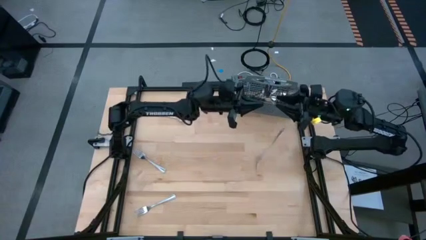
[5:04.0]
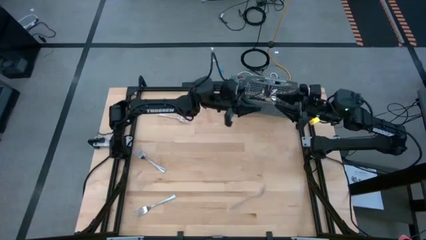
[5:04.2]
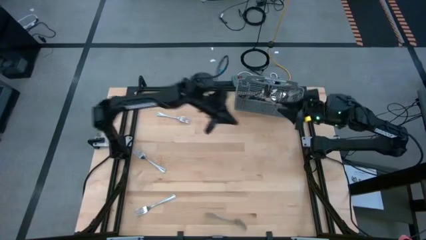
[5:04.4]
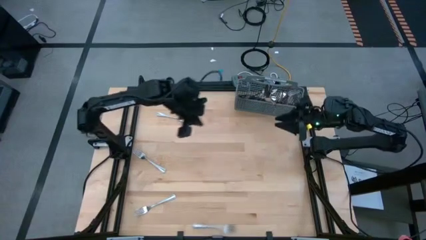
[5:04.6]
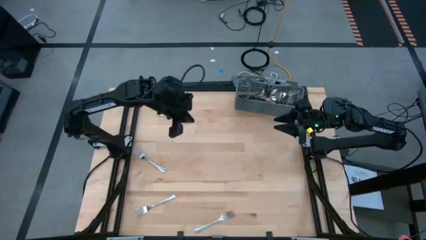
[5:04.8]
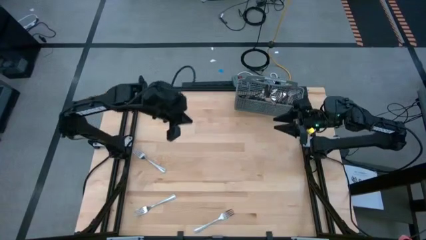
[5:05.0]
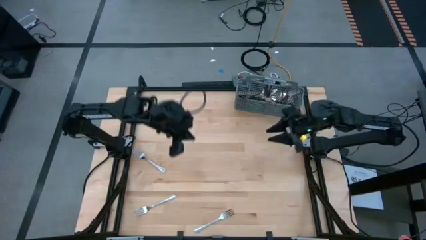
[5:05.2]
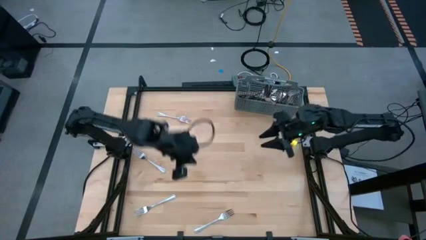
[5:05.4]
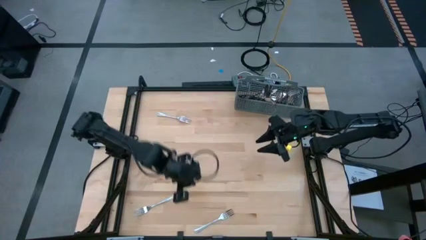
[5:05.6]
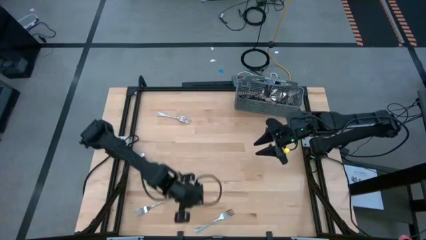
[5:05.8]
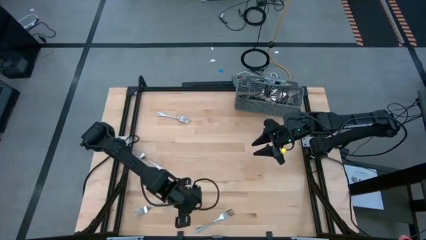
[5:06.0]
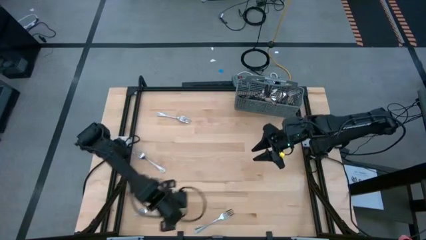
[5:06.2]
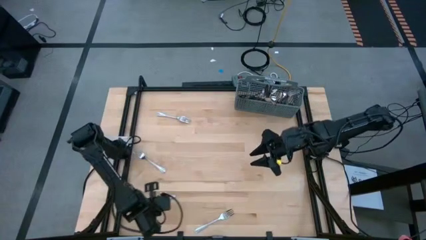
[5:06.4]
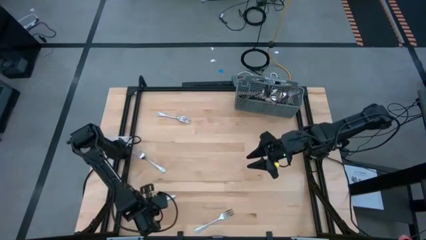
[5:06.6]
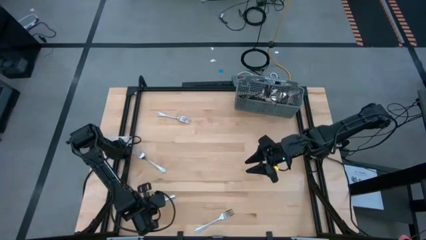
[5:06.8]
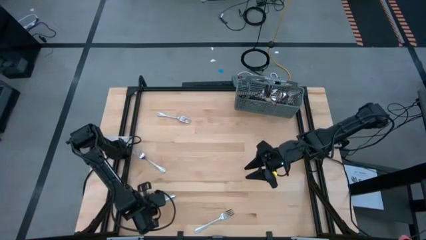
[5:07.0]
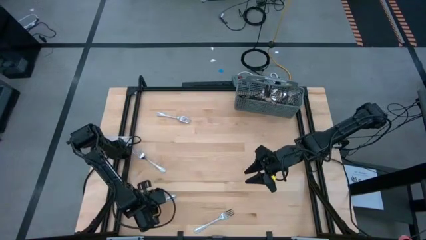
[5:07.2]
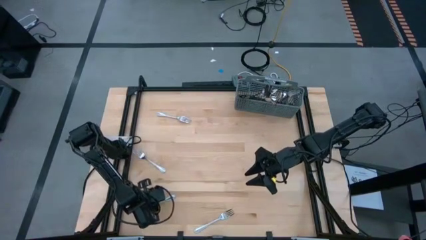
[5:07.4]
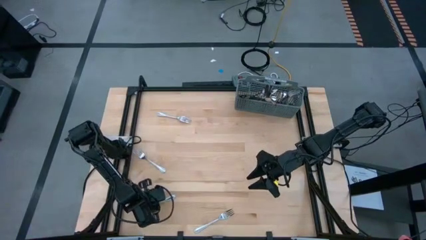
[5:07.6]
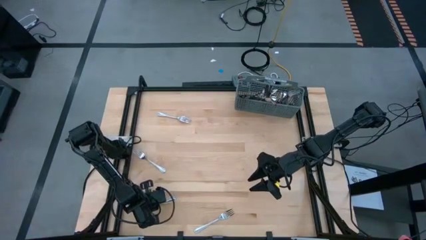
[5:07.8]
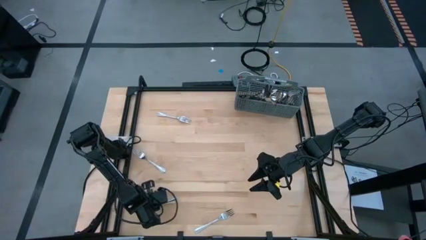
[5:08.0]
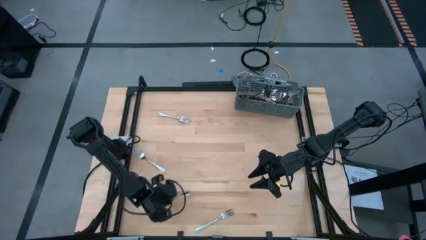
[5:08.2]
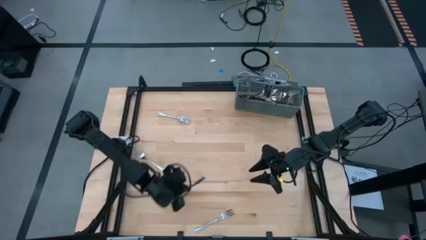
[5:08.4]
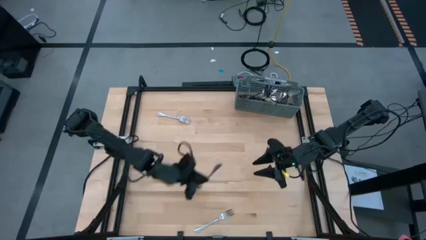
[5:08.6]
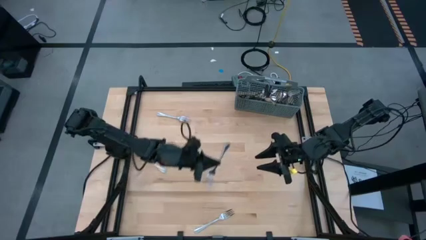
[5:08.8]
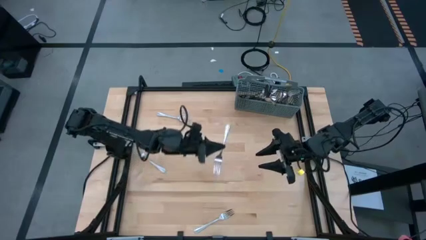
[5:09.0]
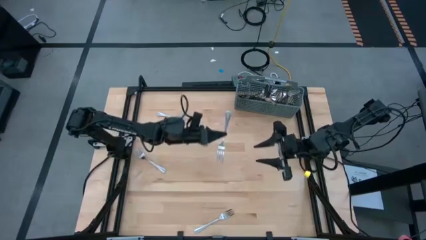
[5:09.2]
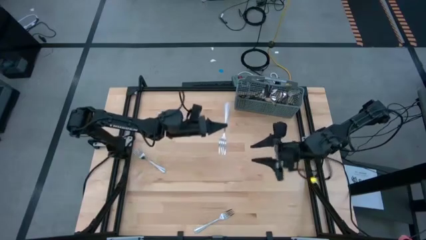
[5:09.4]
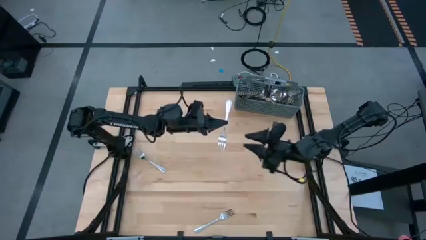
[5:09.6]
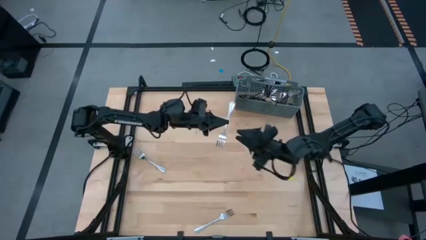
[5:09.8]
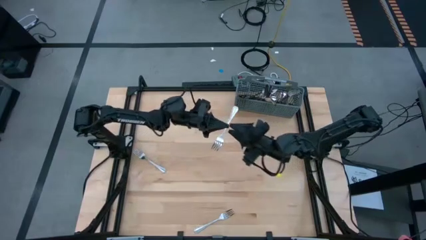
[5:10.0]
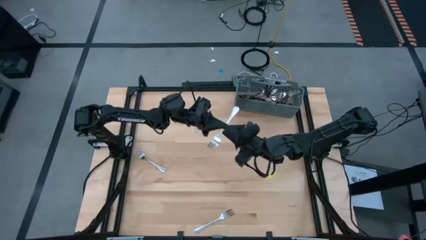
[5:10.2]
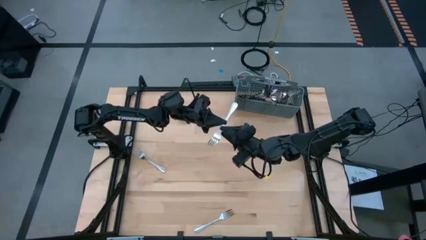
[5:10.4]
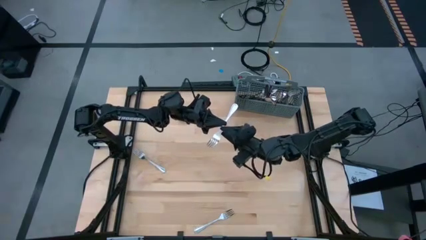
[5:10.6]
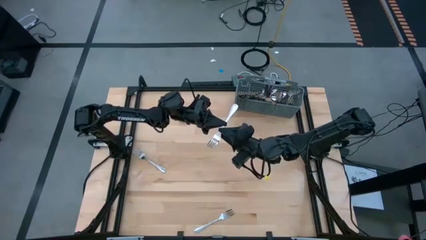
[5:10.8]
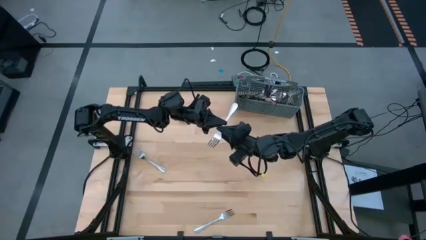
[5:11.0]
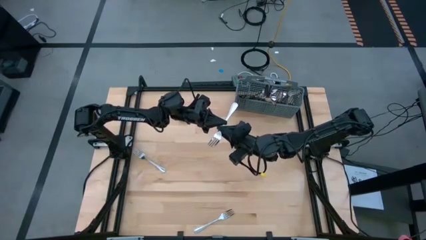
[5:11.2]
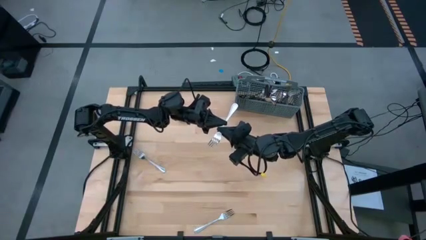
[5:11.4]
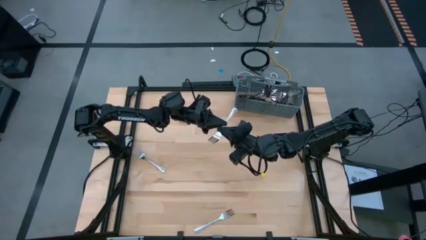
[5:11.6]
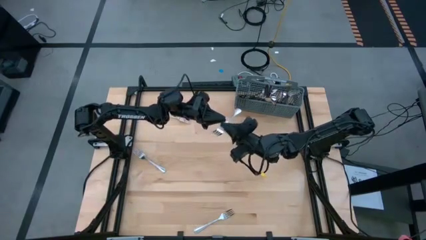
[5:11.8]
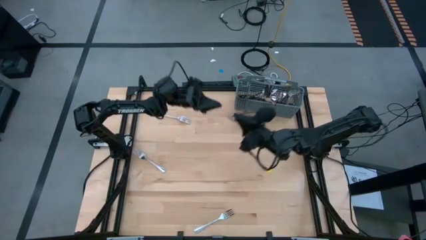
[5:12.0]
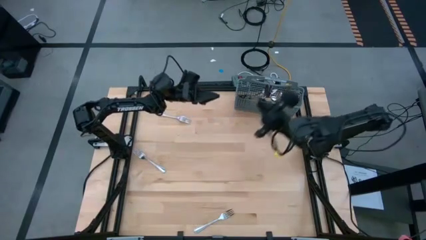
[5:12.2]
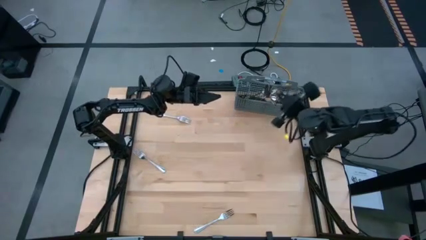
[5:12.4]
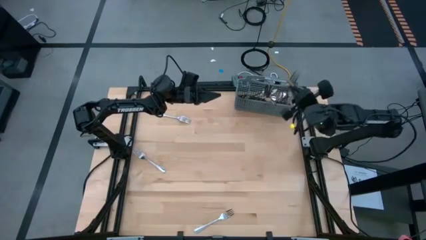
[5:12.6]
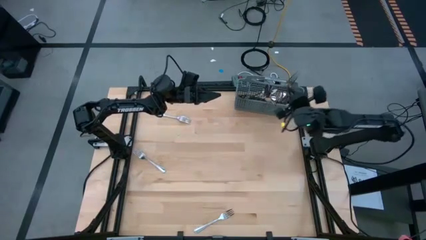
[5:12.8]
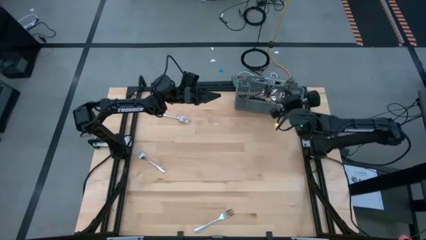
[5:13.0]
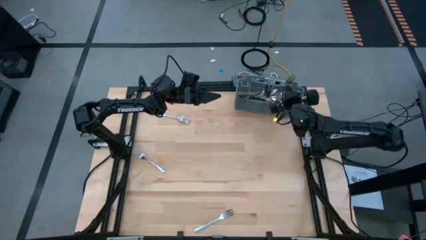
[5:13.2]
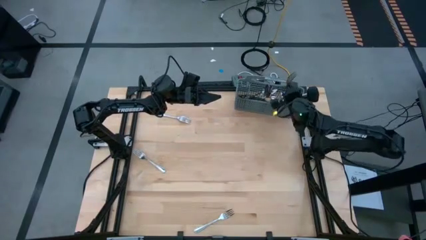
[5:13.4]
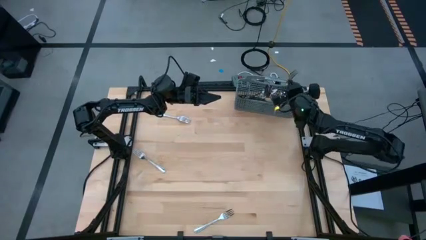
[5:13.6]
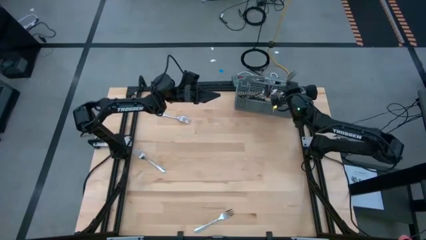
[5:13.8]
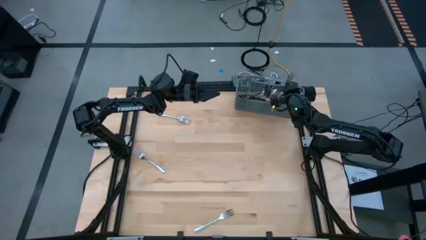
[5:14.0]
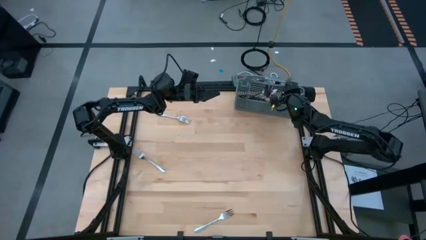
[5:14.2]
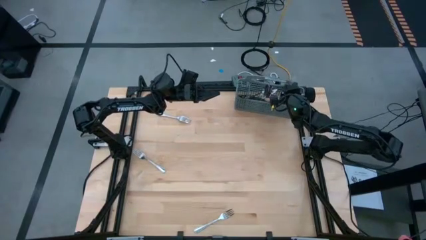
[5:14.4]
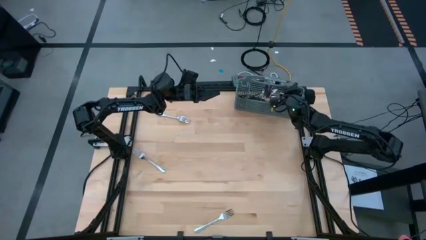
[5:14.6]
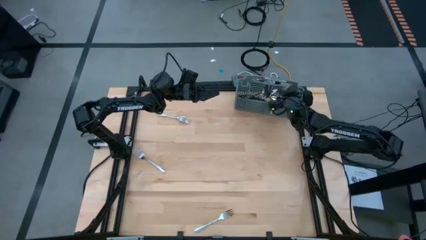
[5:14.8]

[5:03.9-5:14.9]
Task: Sort silverware
Put the silver spoon into the silverware basket

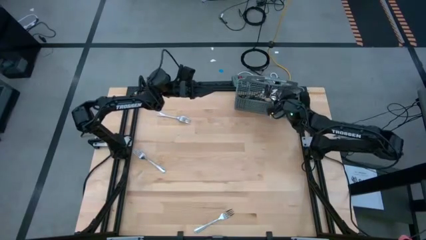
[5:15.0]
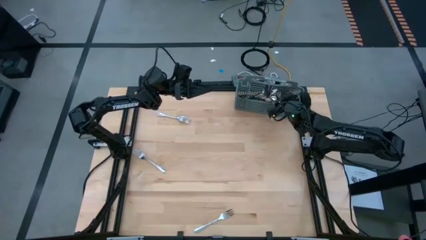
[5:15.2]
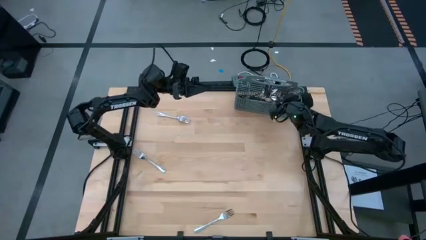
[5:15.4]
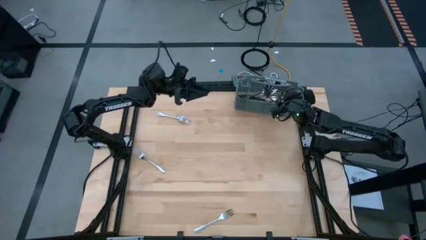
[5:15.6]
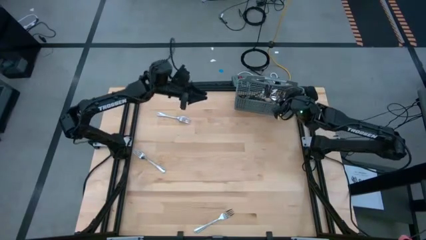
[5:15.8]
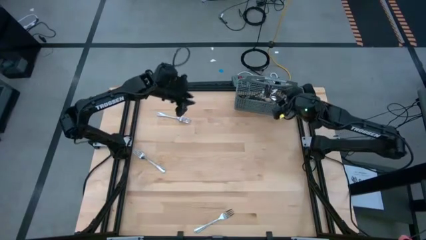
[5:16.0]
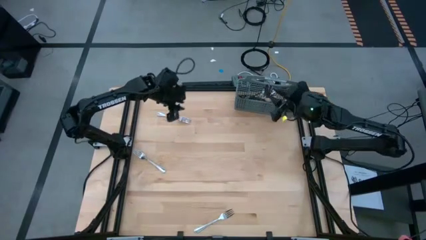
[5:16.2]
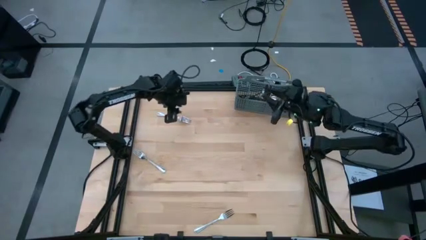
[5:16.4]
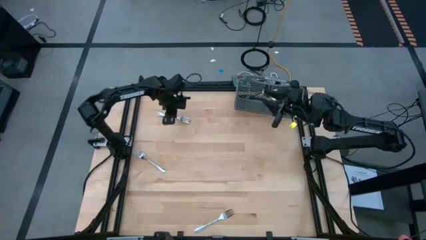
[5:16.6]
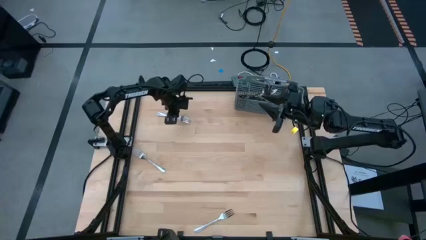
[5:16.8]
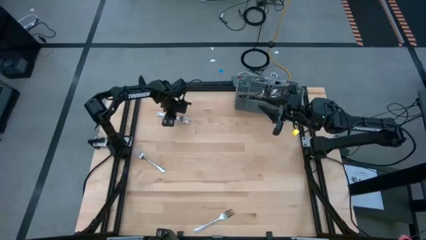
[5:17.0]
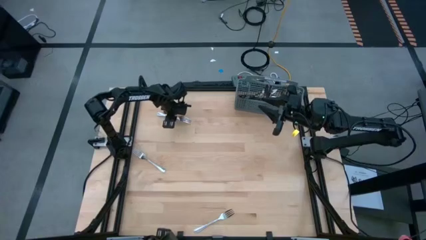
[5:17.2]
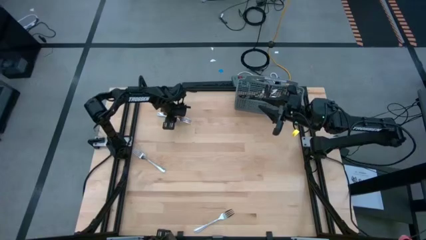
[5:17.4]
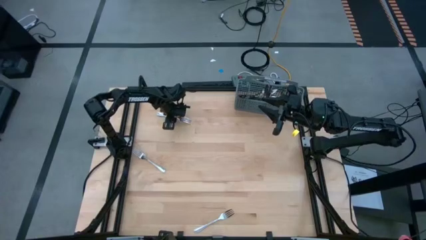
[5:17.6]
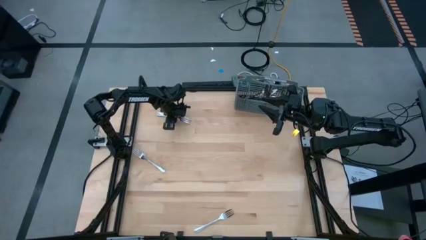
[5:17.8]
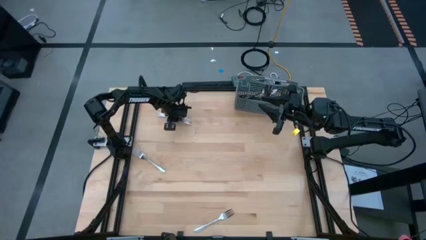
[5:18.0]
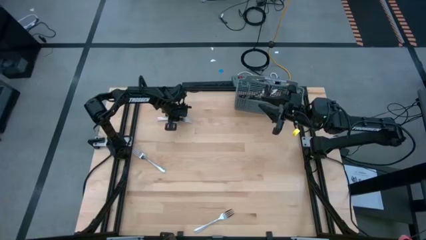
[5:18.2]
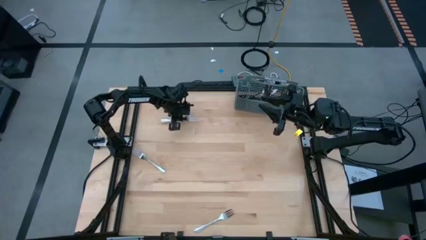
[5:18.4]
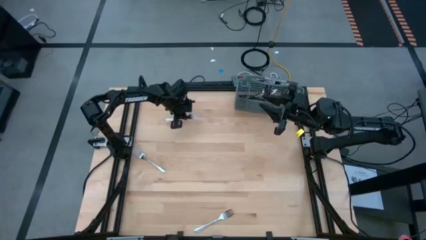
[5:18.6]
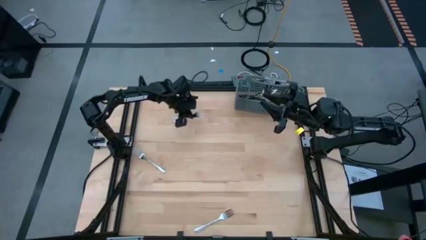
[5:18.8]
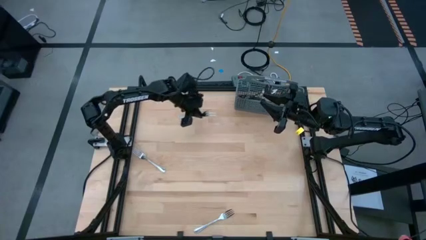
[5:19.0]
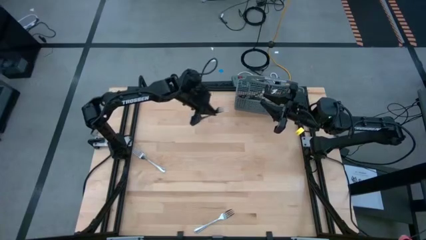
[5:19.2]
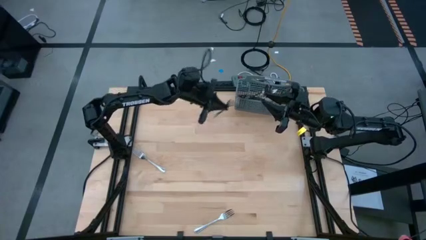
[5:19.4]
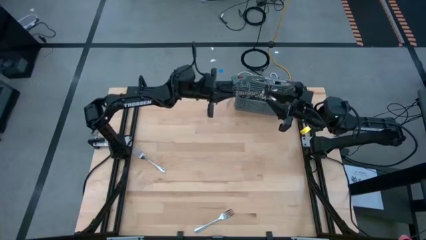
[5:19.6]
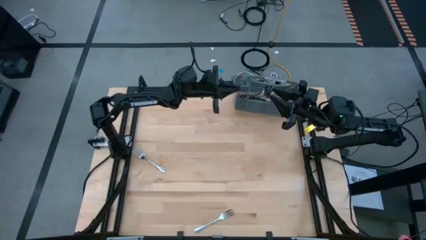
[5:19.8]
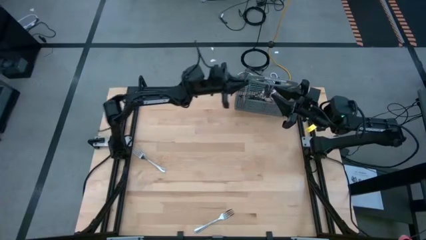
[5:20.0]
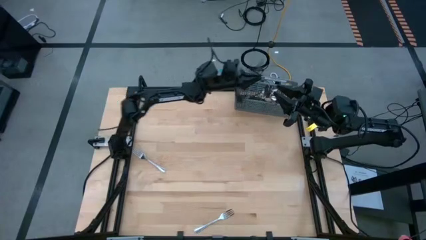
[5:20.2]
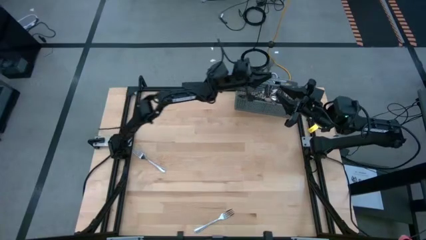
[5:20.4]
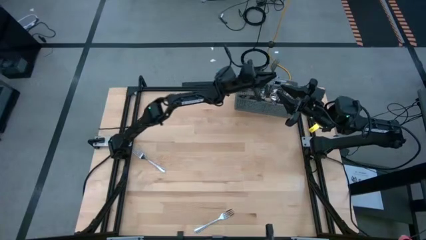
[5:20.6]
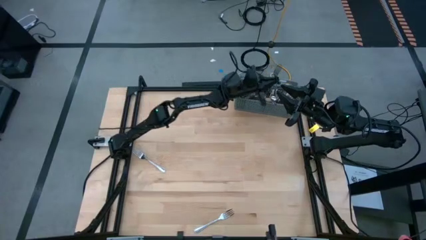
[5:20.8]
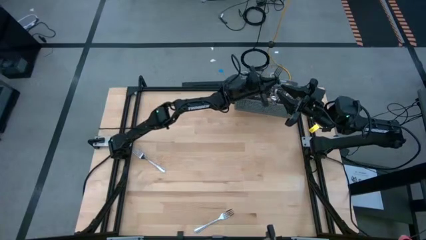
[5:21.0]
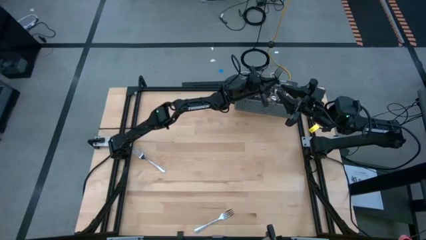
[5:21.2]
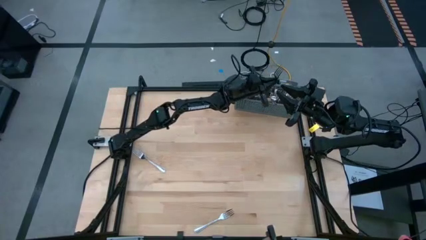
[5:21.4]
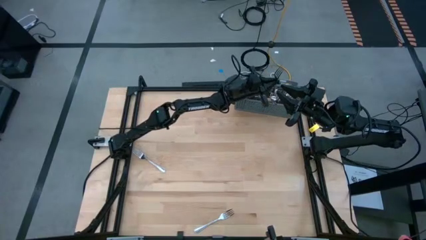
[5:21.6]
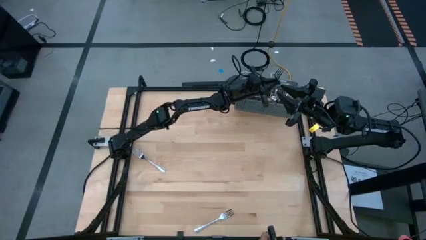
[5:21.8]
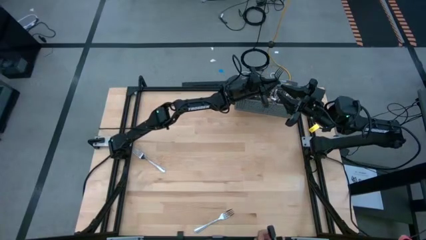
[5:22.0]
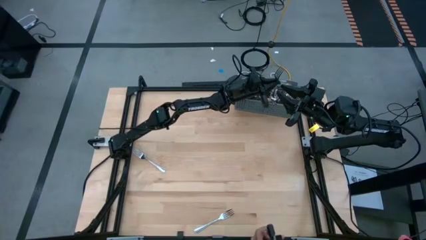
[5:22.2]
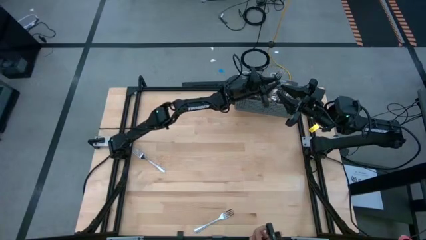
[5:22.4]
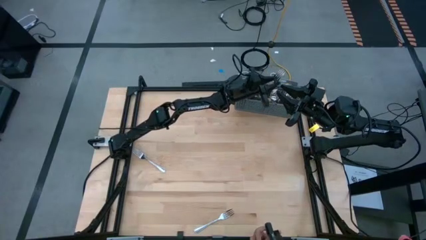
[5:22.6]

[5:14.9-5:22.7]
Put the silver spoon into the silverware basket
